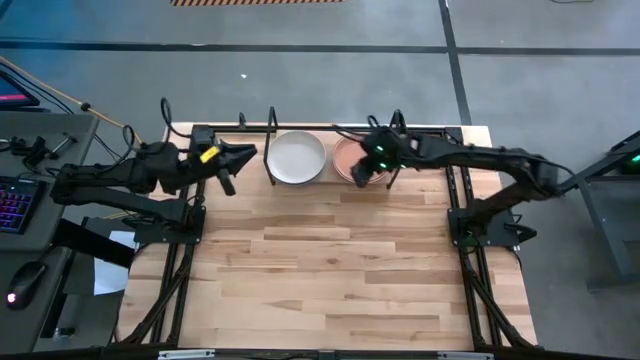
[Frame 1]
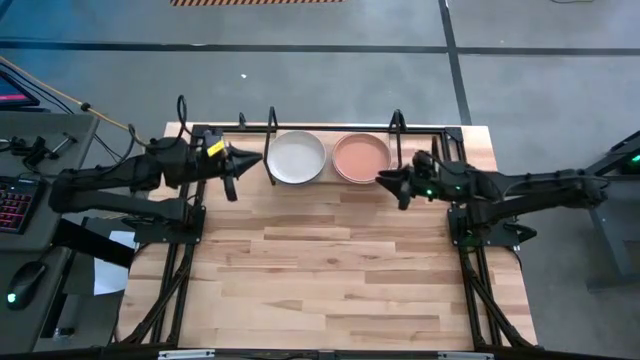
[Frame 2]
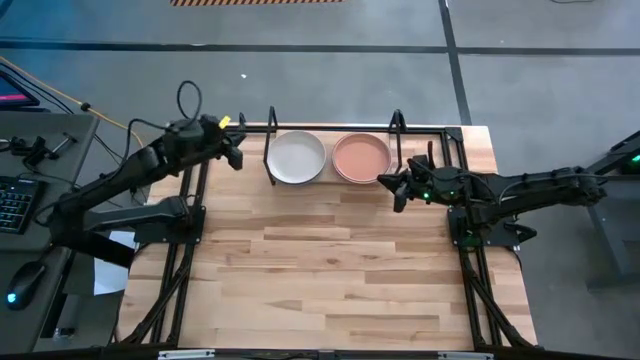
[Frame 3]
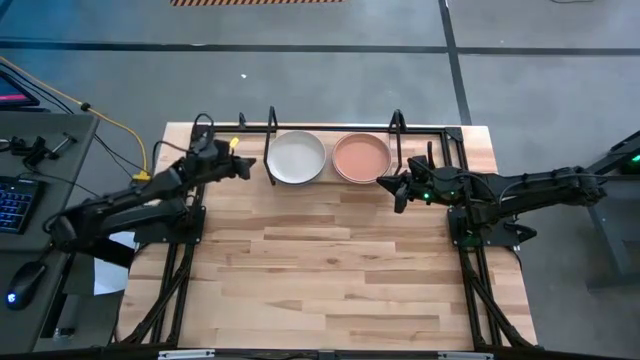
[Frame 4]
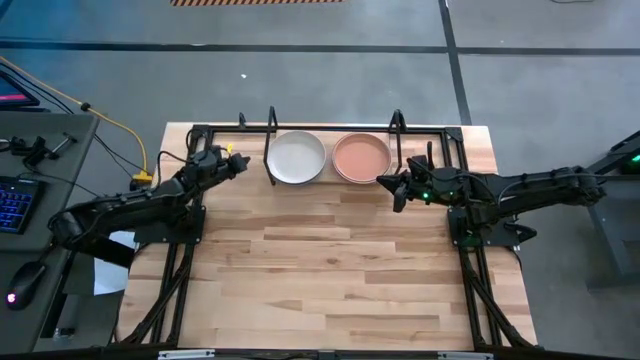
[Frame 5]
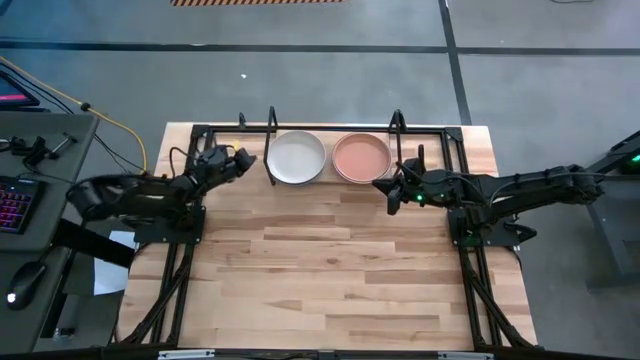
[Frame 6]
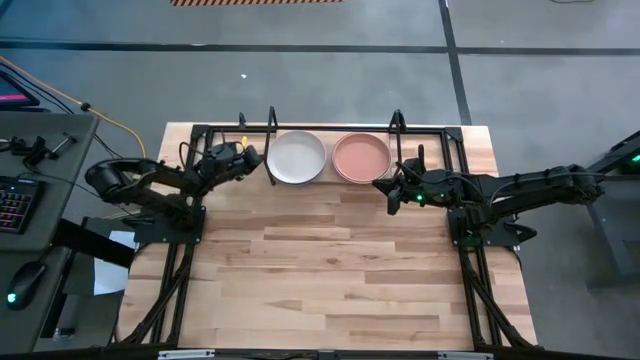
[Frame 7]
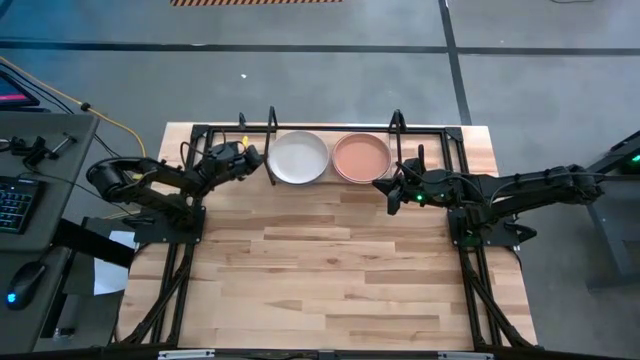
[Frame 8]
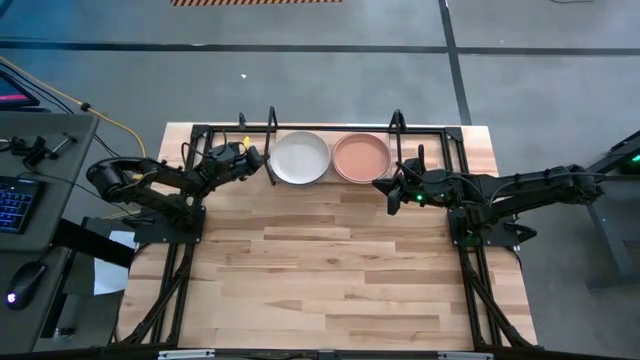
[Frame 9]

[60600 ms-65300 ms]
Task: Place and stack plates onto a shelf
Adjust the colored plates on the shelf

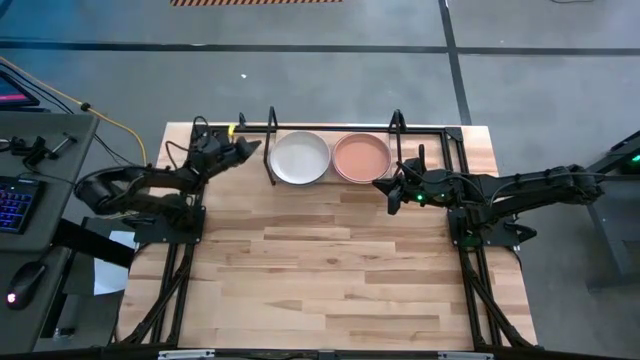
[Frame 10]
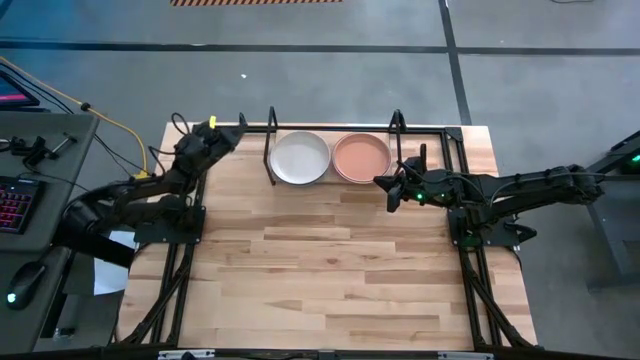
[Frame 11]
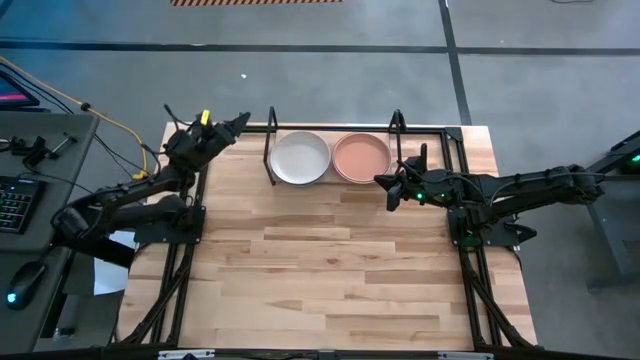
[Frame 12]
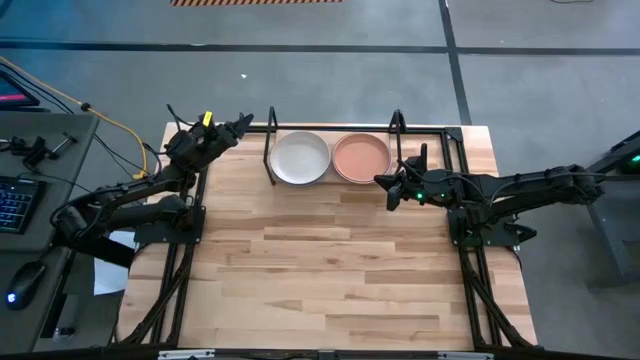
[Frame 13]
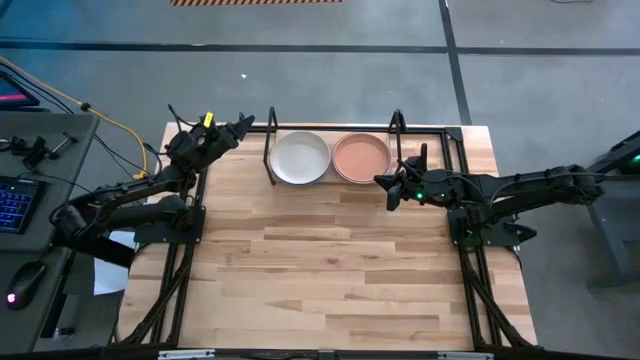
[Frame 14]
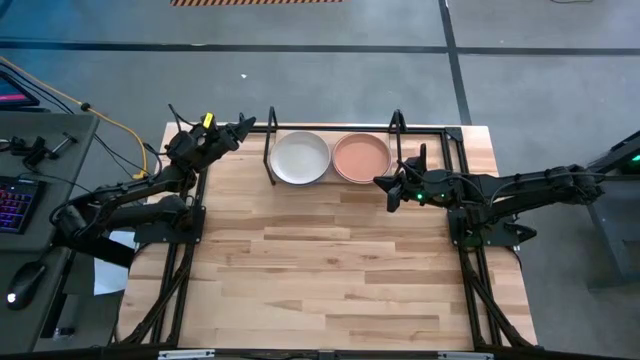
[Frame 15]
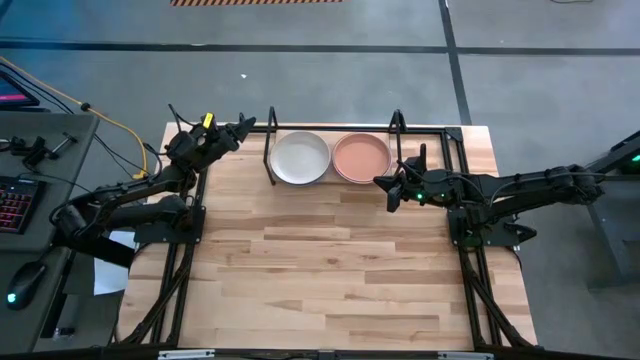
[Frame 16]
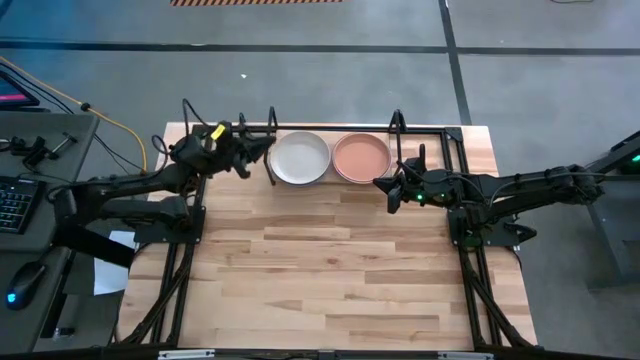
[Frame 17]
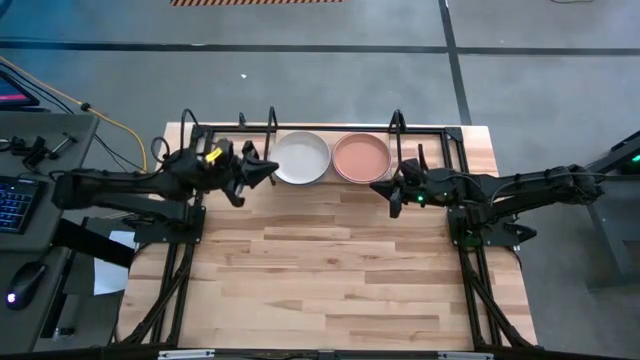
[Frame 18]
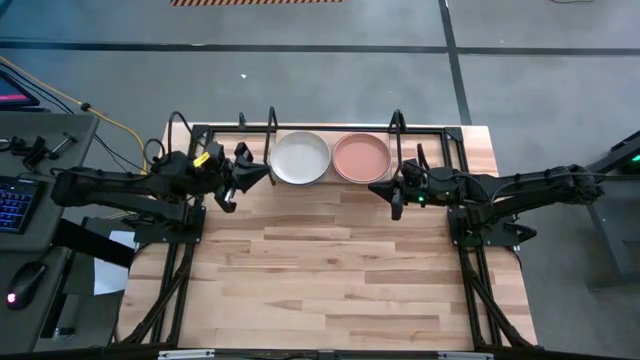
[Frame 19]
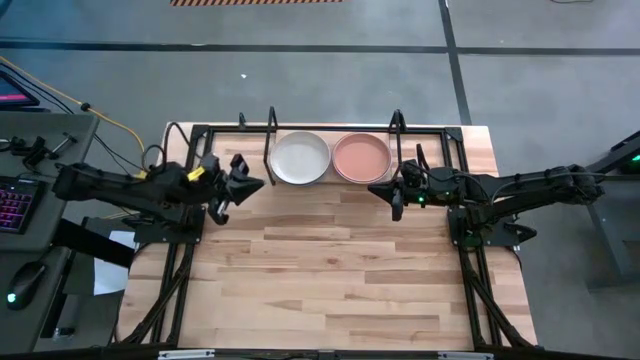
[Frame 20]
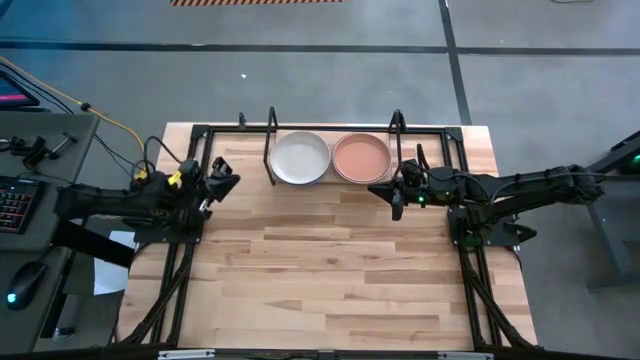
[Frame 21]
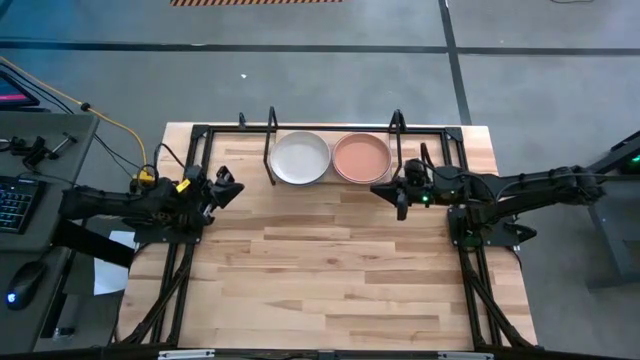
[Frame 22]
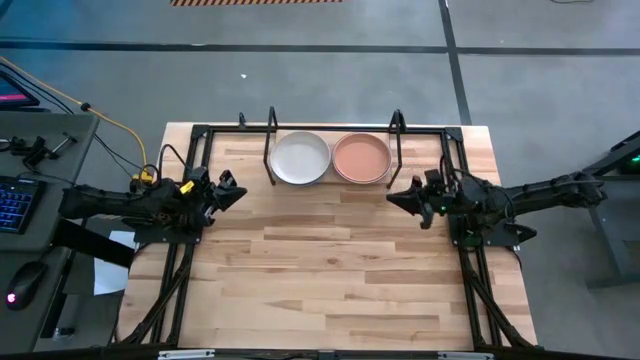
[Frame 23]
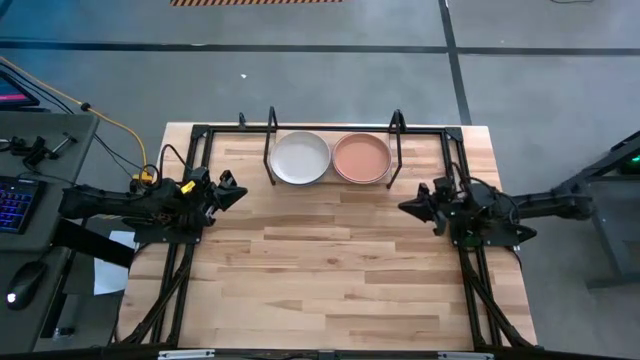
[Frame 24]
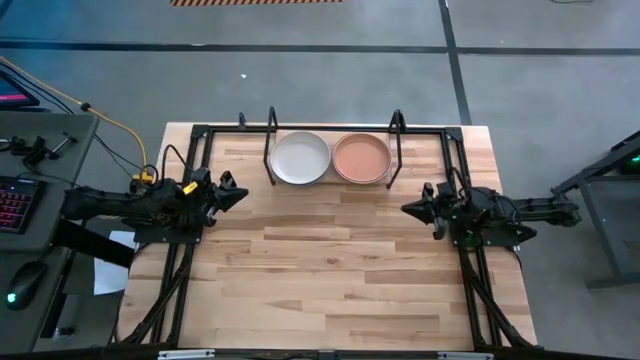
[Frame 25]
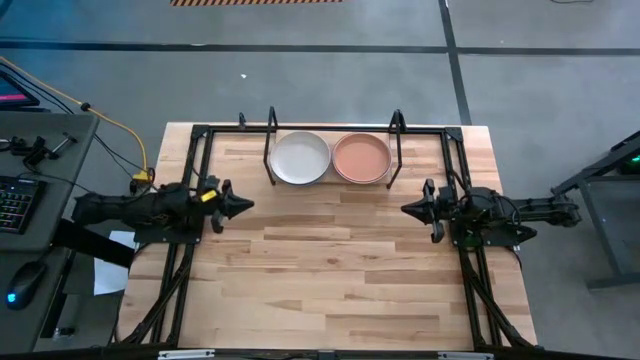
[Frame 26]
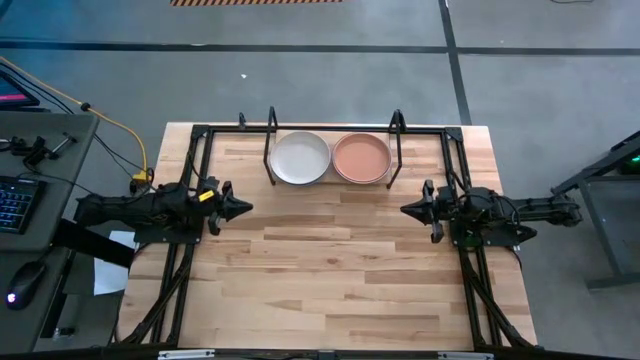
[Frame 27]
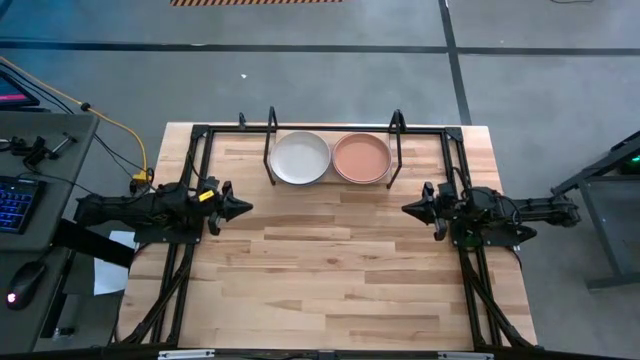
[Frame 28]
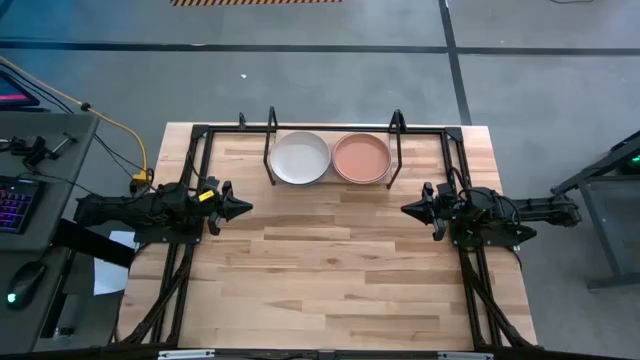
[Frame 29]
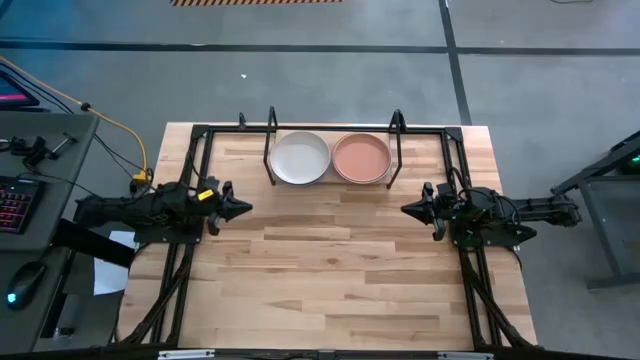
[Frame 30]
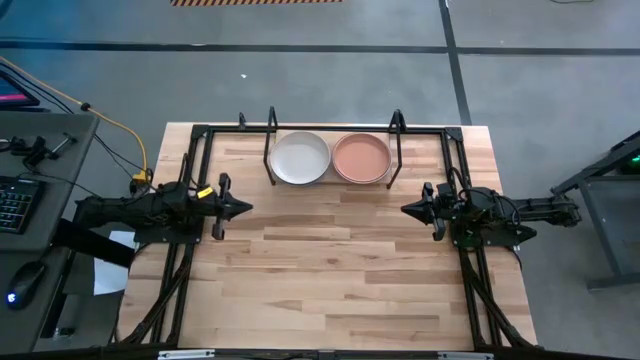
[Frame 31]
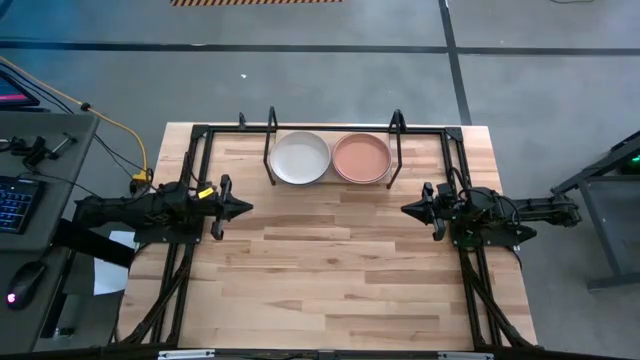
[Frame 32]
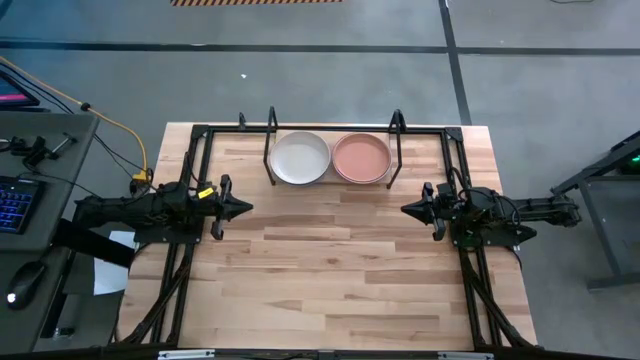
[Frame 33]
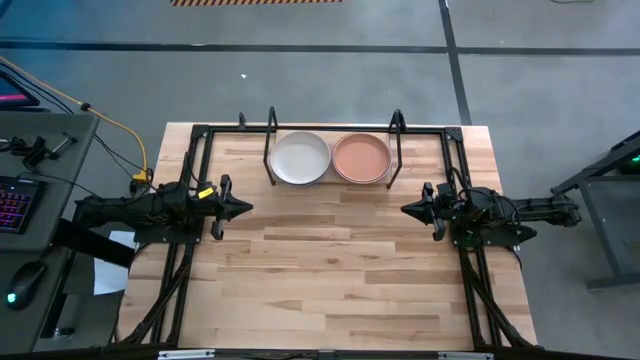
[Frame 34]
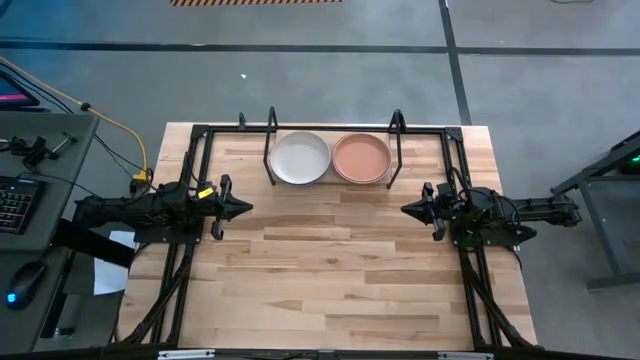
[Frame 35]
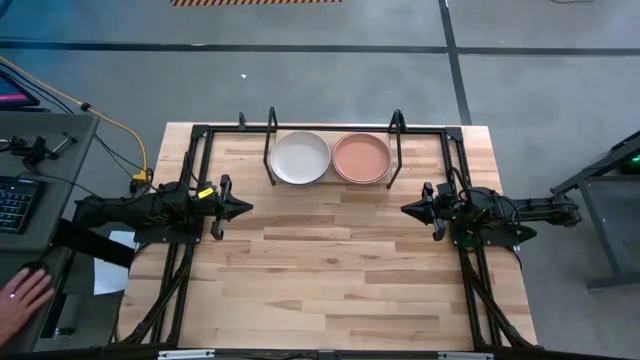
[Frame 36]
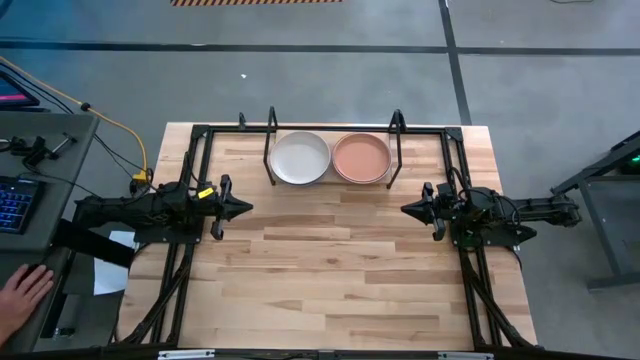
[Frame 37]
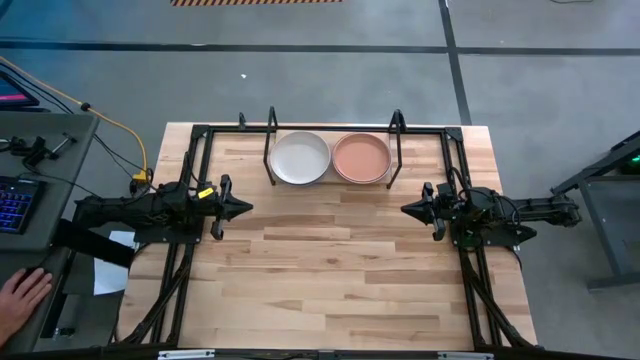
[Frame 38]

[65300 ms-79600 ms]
Return to Home Position

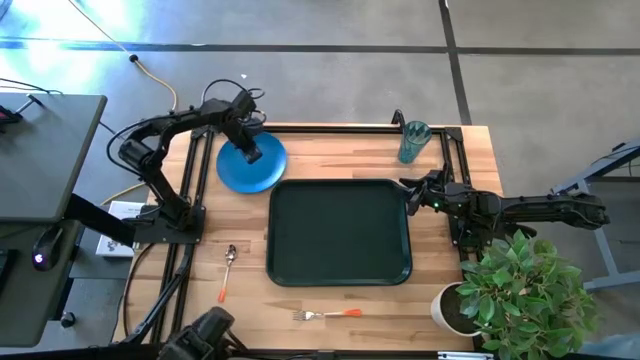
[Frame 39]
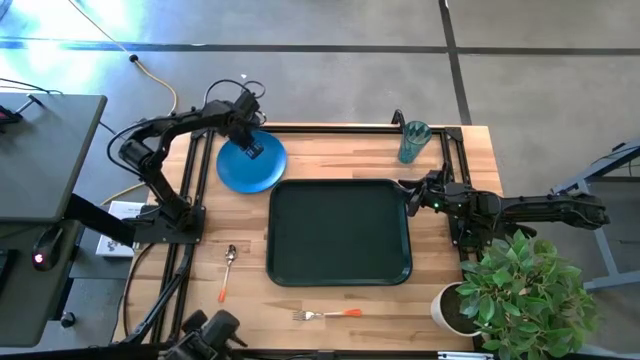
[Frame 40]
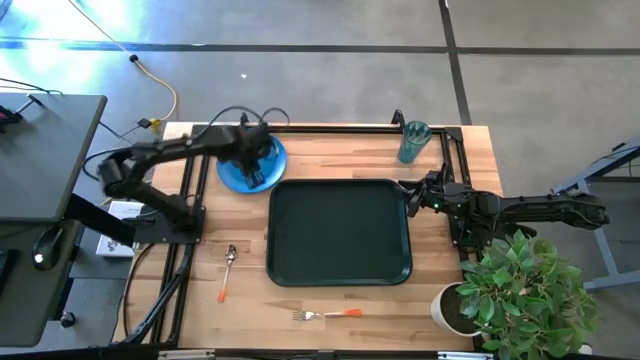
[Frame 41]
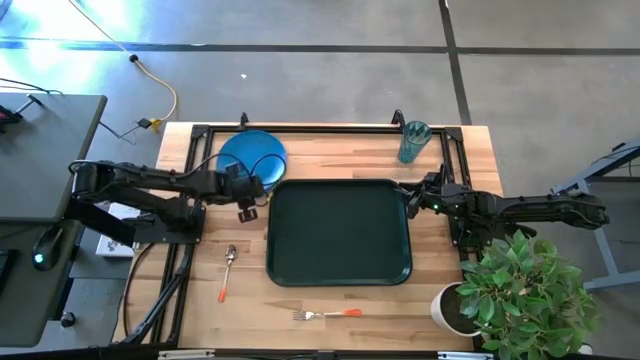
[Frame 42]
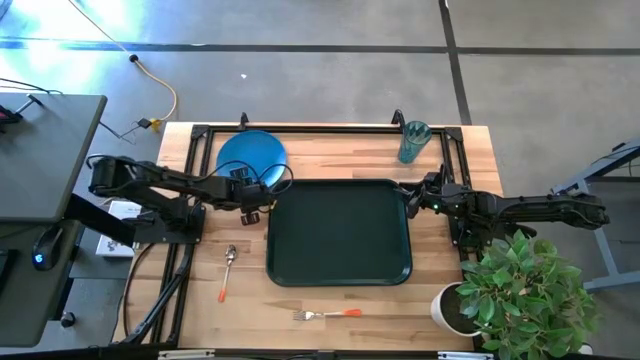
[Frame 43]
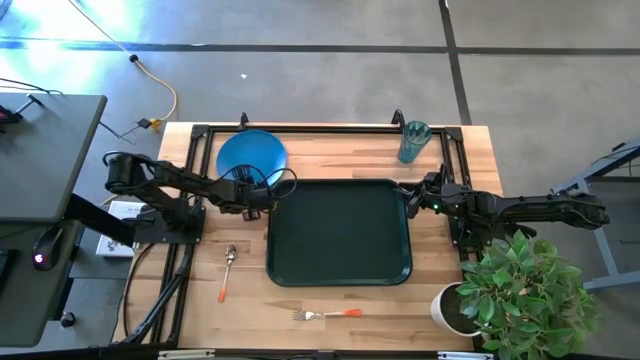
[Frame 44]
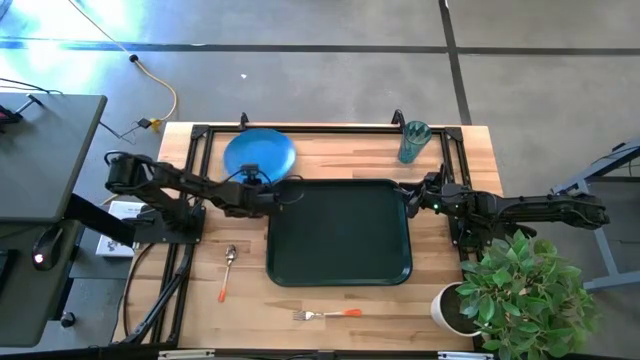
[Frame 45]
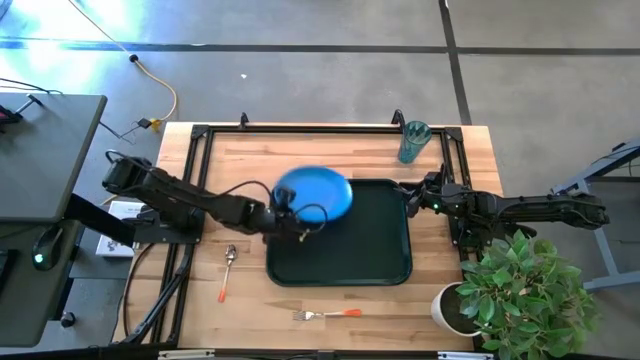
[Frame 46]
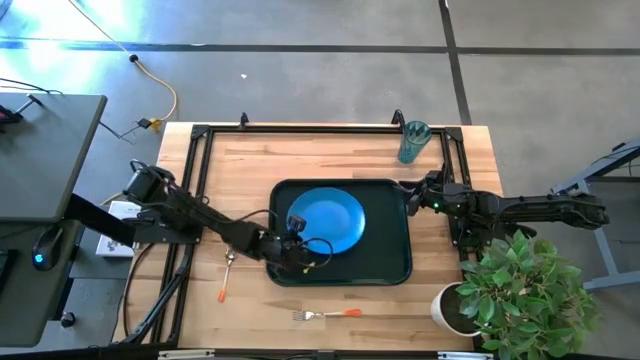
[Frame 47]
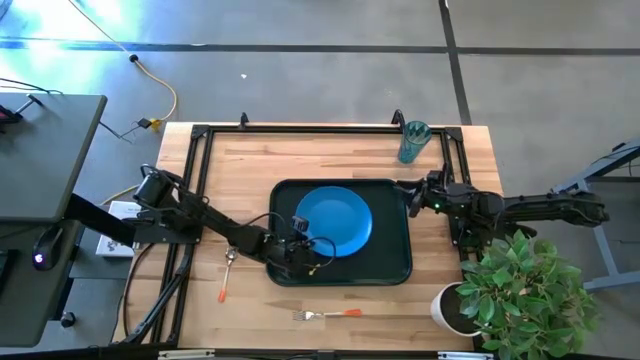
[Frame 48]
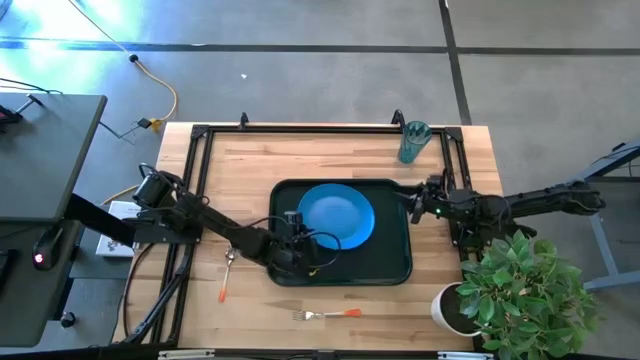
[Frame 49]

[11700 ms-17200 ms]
Task: Pick and place plate/cup/fork/spoon on tray
Put the blue plate on the black tray
